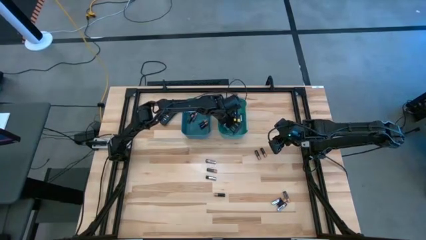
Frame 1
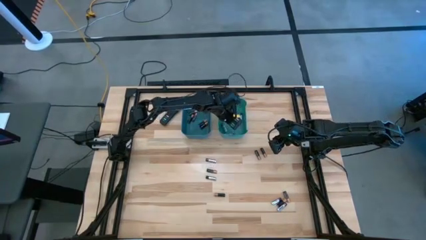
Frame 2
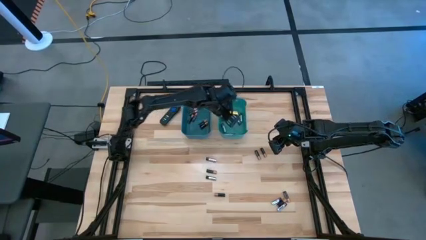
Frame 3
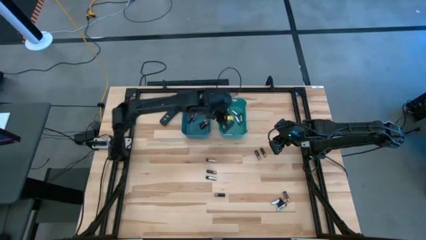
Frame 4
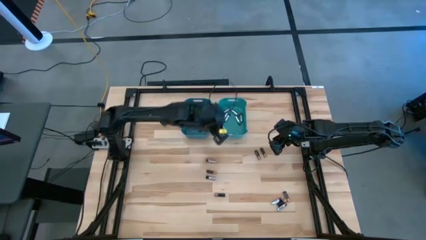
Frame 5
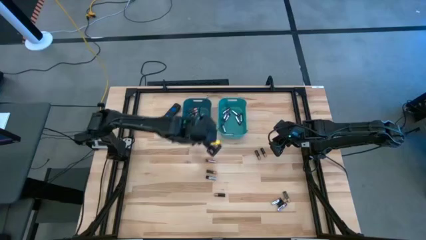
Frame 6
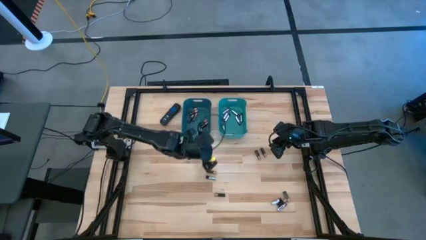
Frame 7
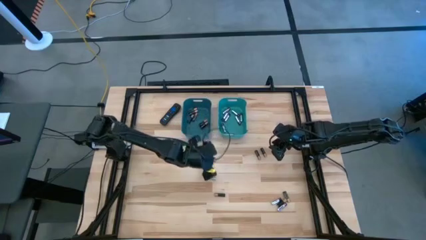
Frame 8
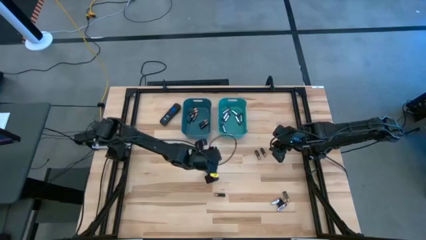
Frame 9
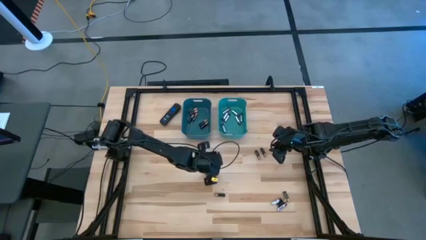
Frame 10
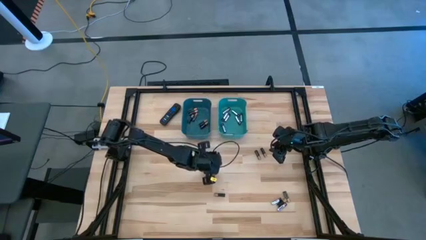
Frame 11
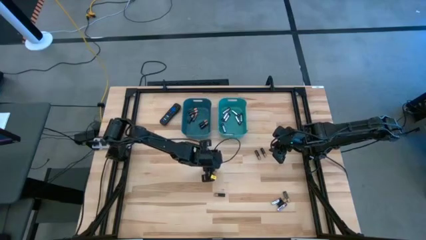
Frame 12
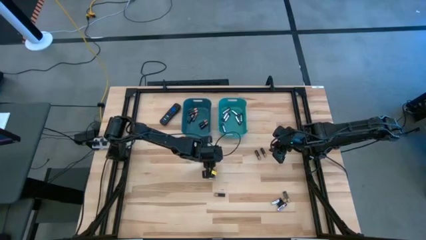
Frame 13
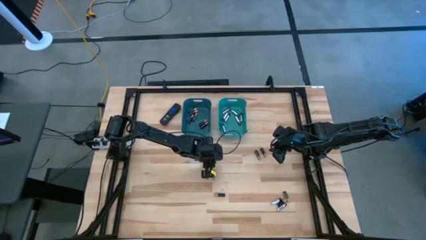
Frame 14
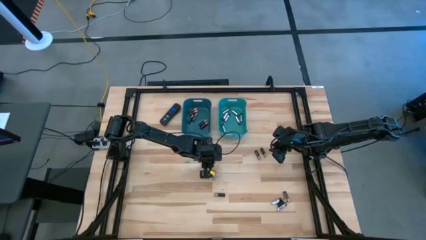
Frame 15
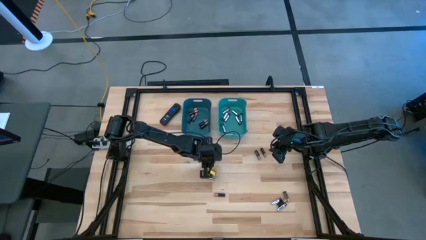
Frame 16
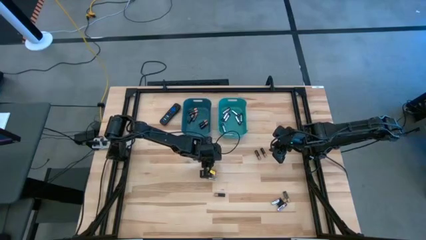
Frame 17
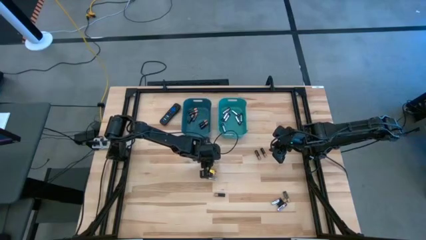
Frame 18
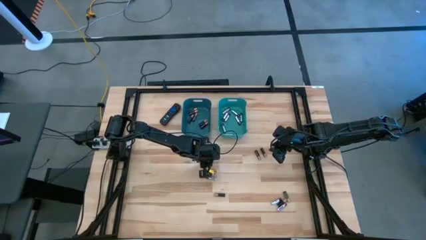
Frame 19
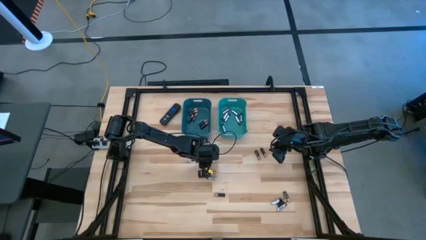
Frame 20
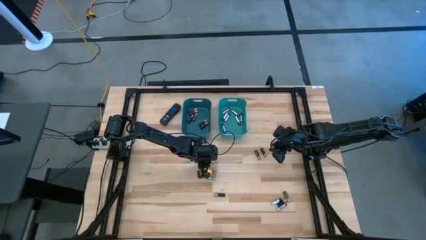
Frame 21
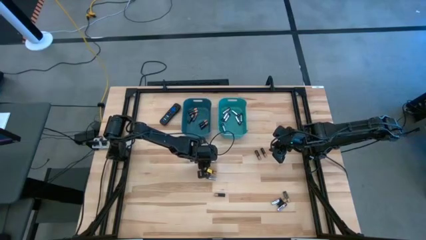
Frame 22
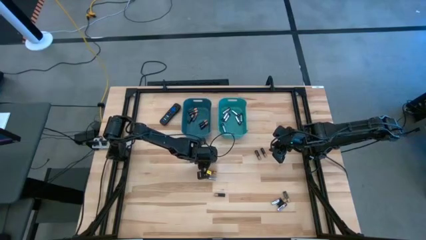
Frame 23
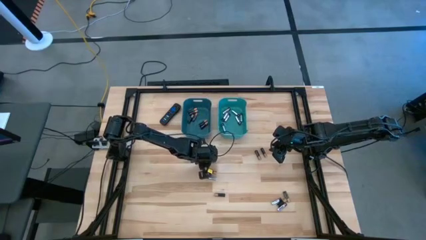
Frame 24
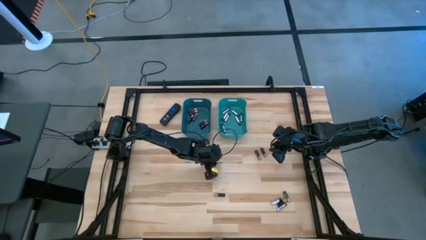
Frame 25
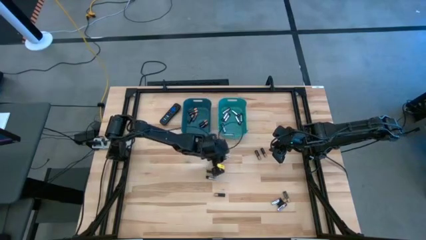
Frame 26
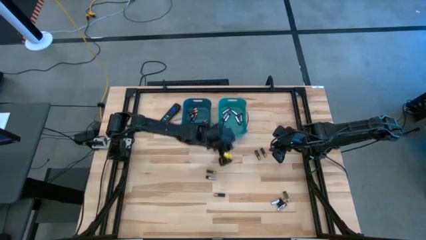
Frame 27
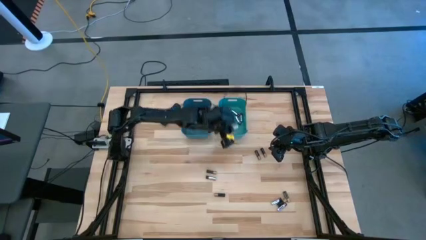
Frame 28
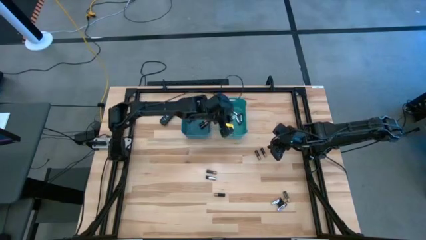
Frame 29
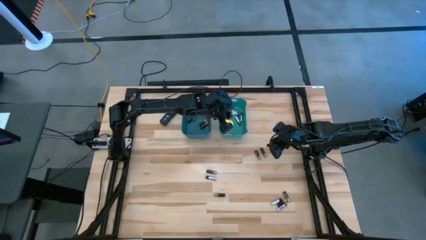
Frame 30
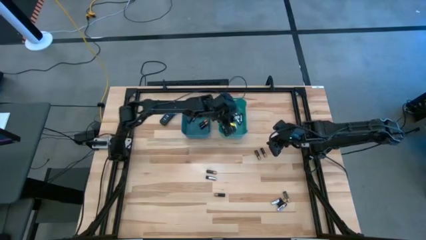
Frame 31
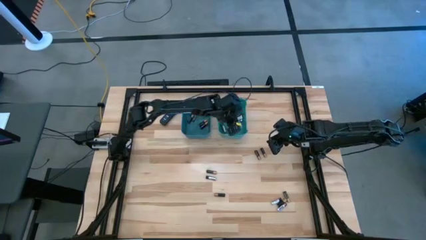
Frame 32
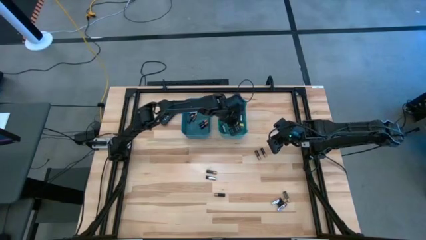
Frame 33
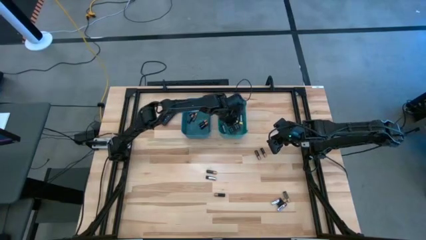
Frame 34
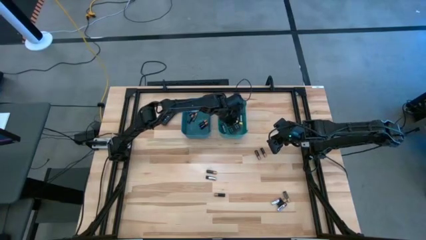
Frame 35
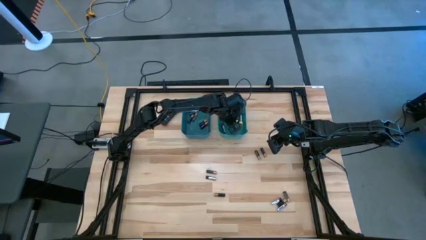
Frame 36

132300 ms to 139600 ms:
Task: Sort batteries
Put the silver battery into the green bin

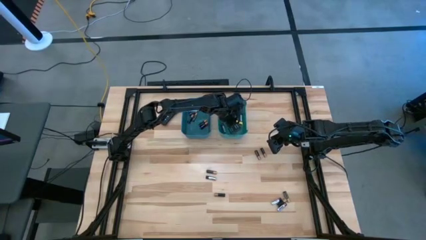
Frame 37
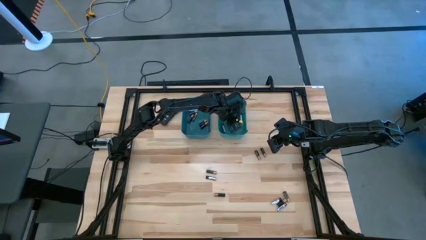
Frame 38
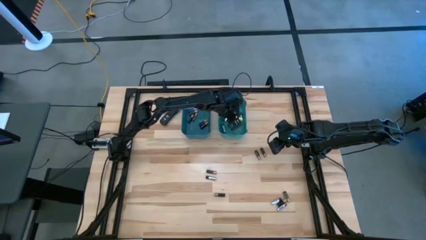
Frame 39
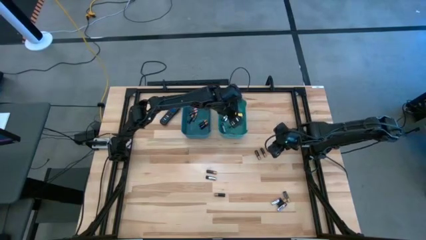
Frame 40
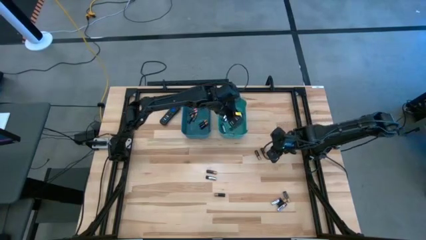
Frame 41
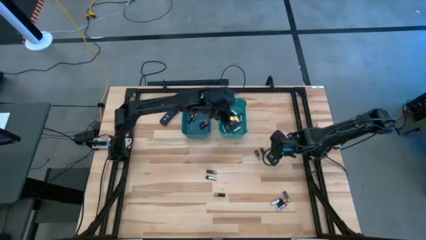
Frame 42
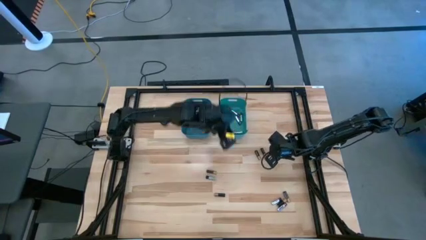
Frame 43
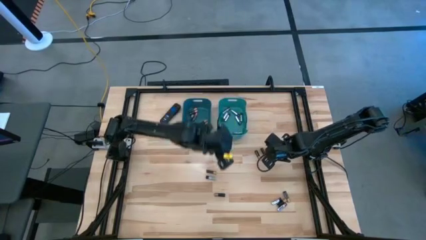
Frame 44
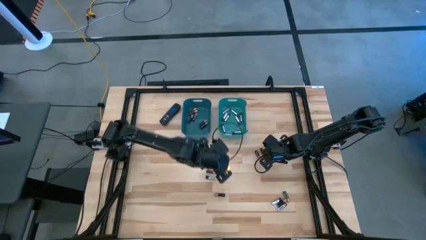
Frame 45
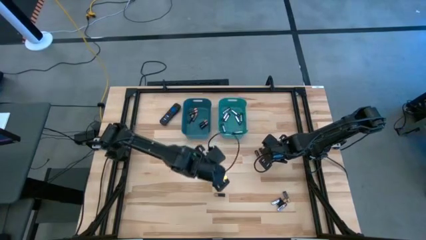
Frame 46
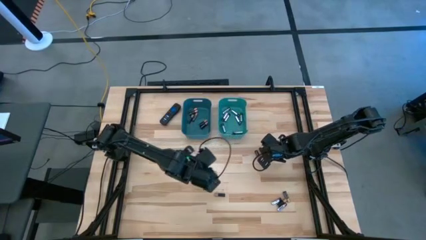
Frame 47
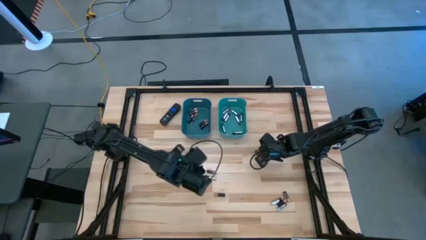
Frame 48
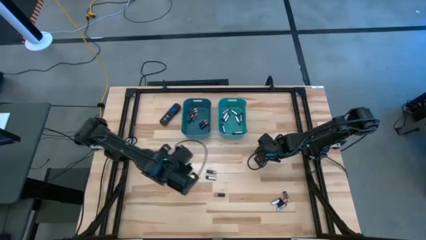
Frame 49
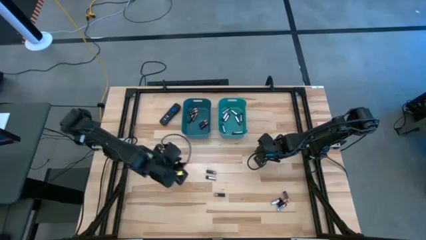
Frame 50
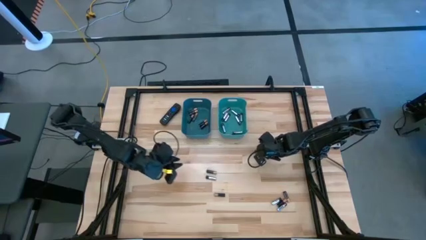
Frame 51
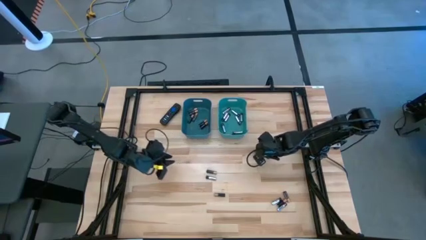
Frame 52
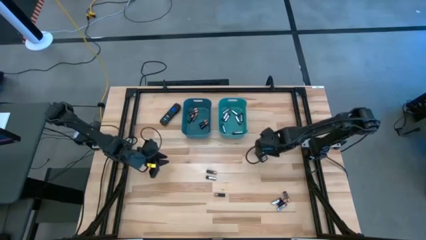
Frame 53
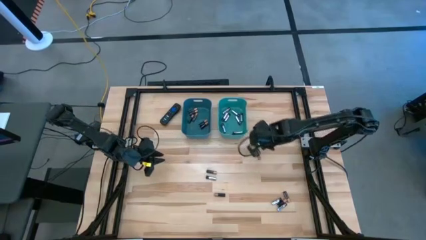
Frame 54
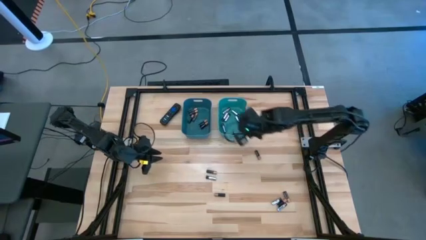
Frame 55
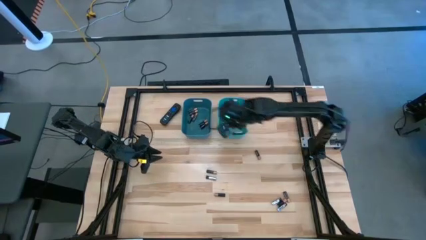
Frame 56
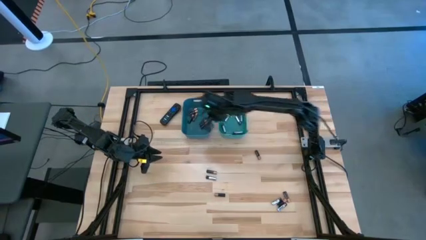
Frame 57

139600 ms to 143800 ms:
Put the black battery into the blue bin

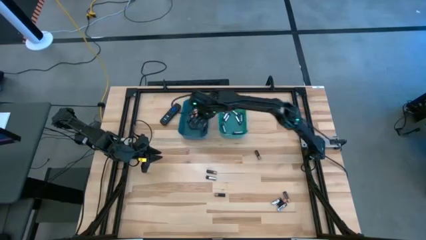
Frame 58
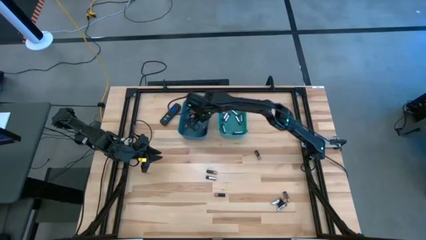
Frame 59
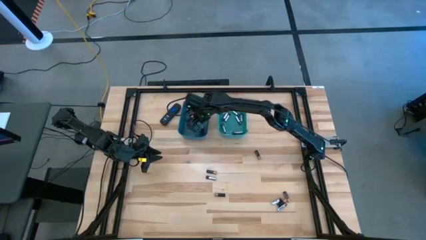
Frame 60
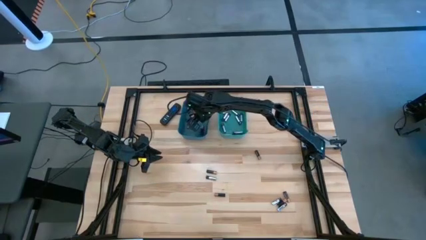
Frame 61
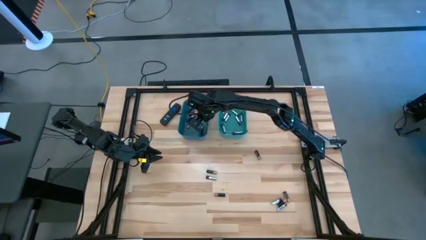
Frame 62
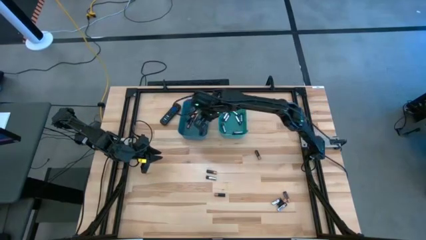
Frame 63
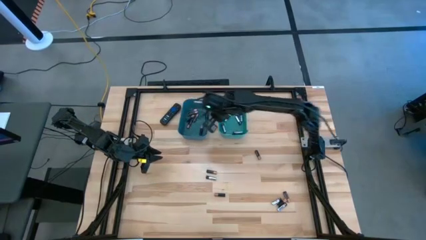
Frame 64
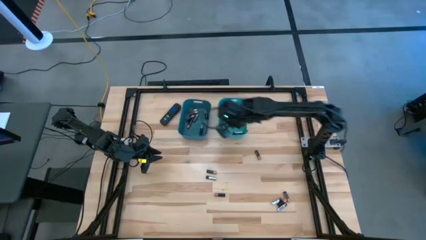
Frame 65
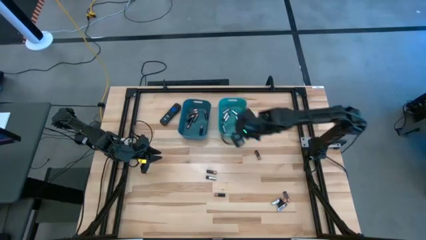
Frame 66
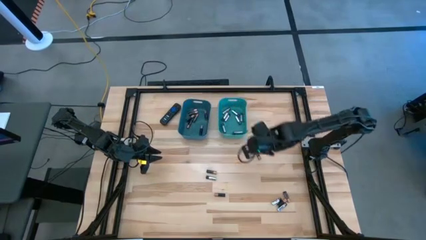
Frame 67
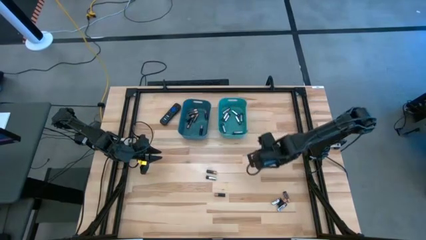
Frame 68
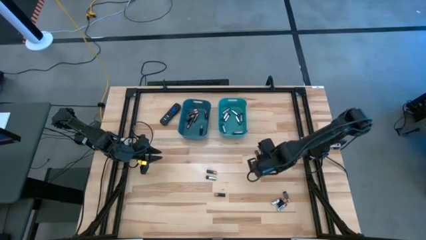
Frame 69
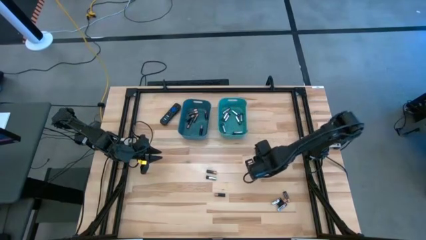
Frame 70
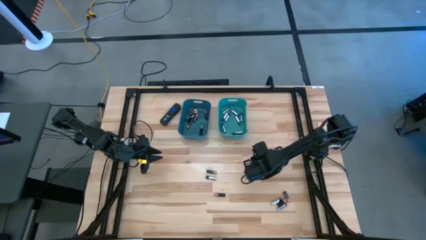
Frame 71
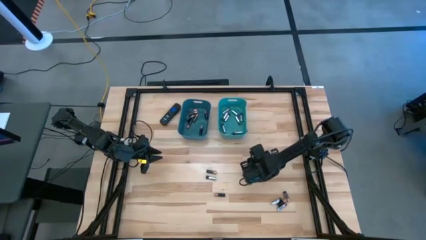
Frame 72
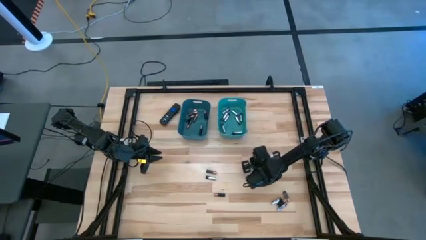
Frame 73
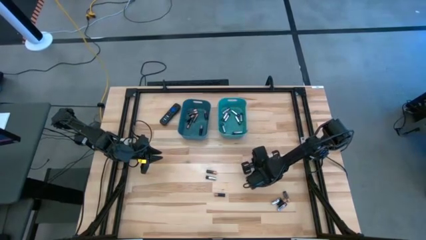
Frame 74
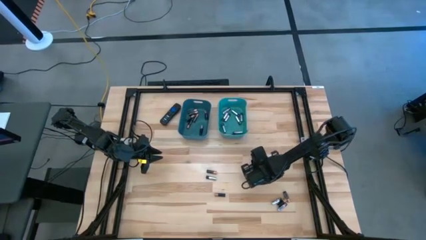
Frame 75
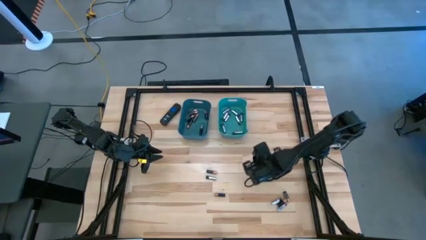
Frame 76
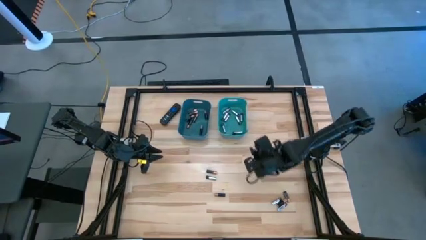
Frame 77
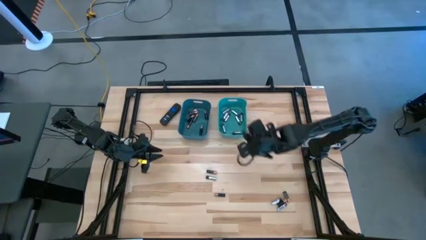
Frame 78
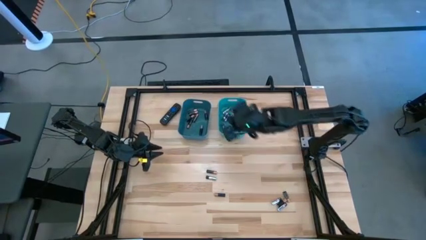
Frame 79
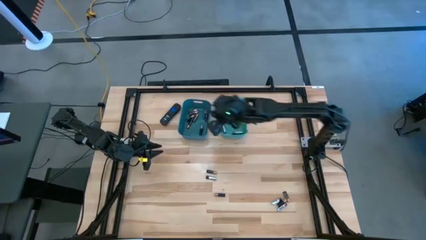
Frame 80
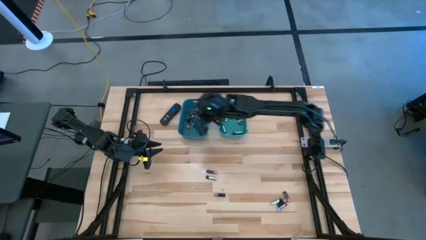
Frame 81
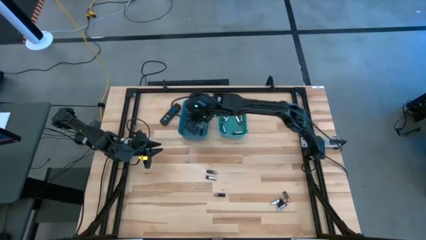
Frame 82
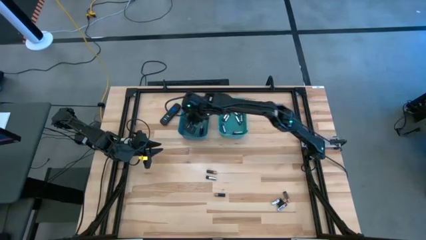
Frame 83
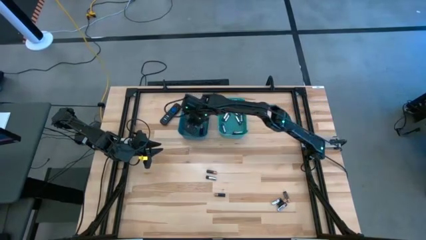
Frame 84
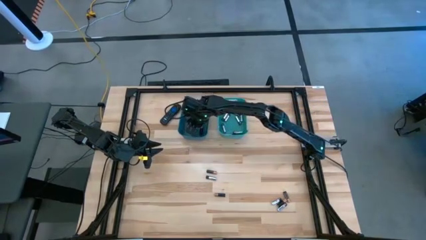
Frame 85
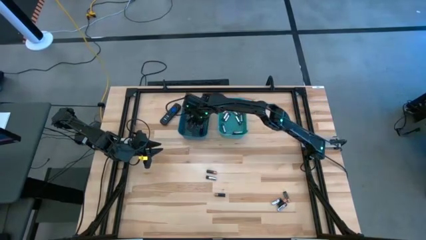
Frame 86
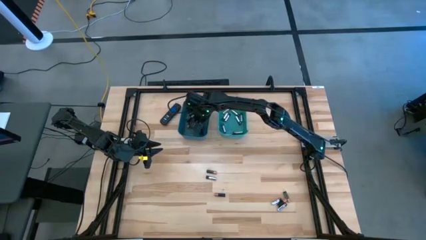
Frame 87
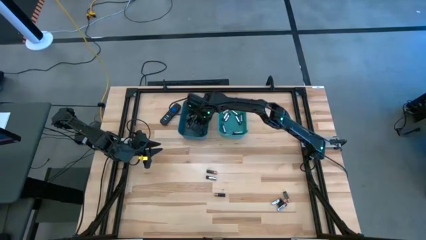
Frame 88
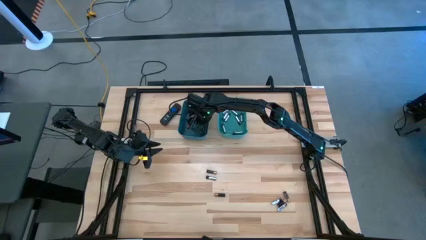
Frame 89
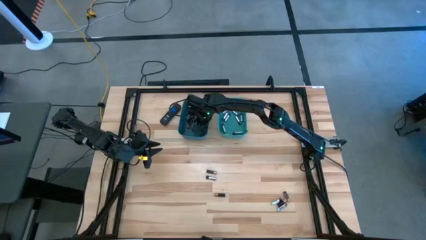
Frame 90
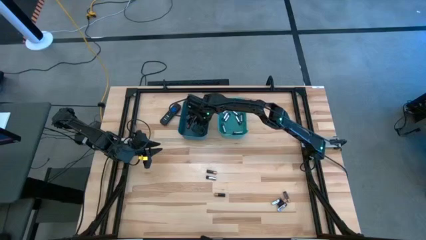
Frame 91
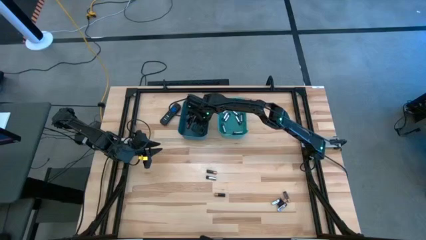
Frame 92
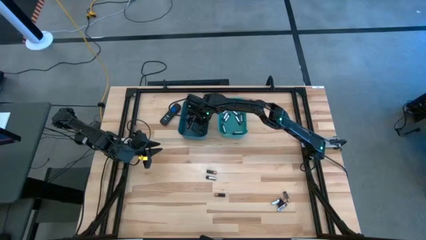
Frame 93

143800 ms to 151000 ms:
Put the black battery into the blue bin
